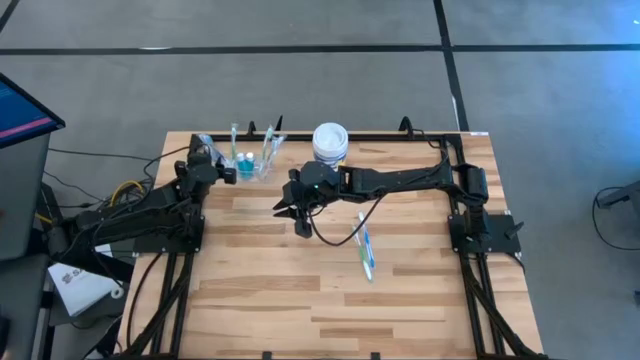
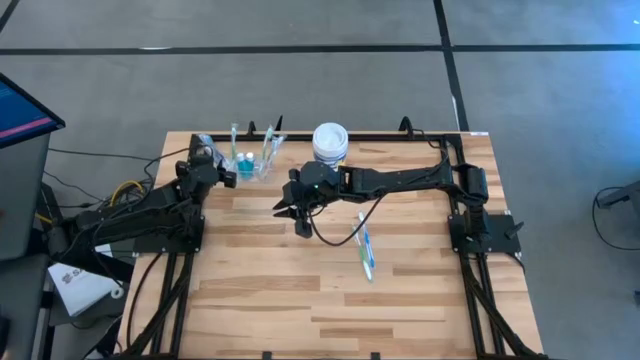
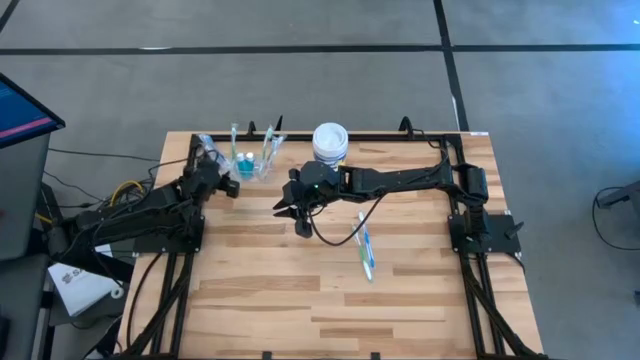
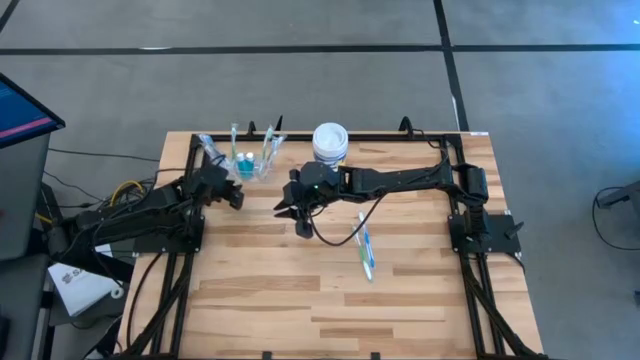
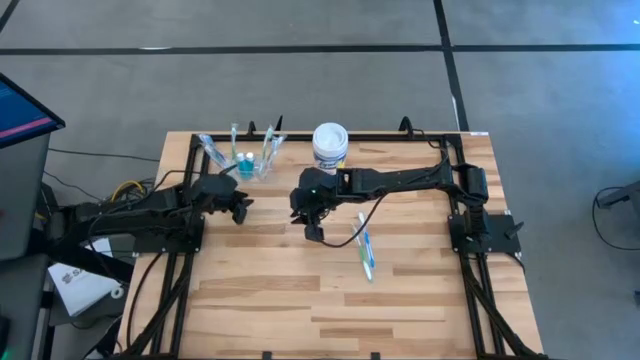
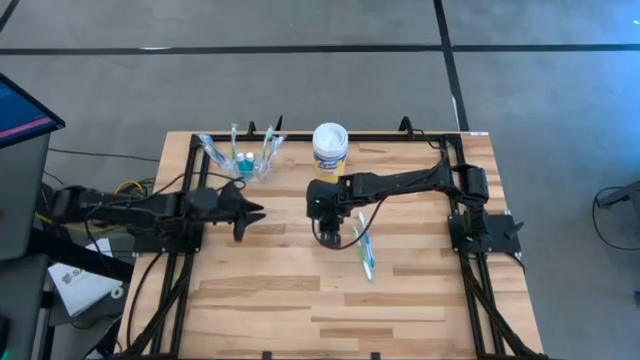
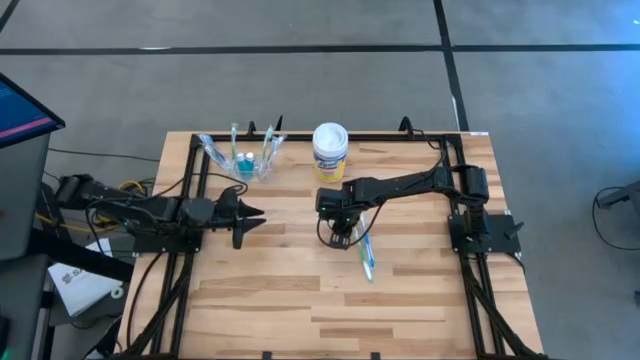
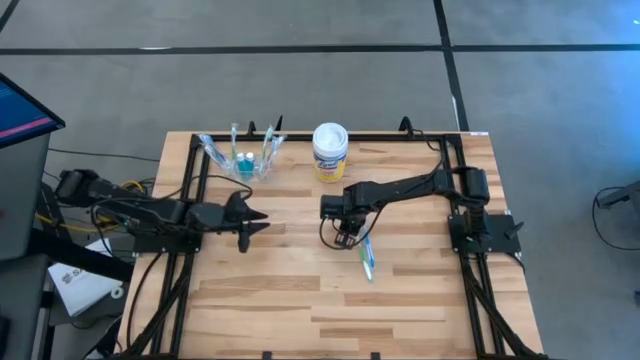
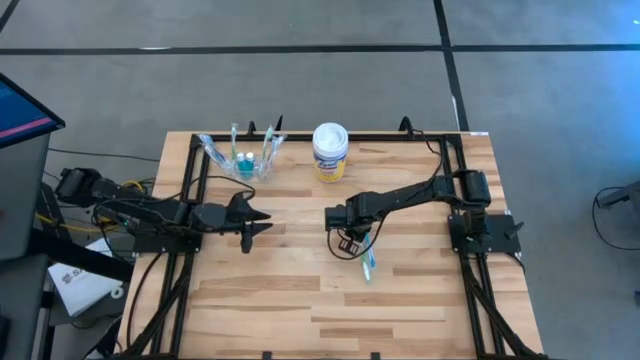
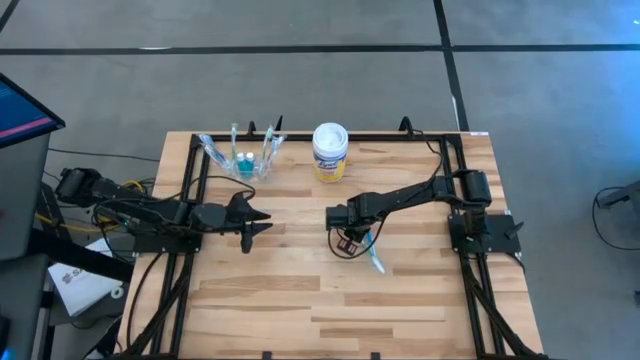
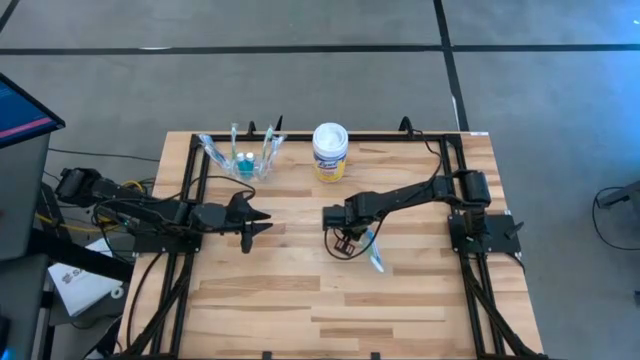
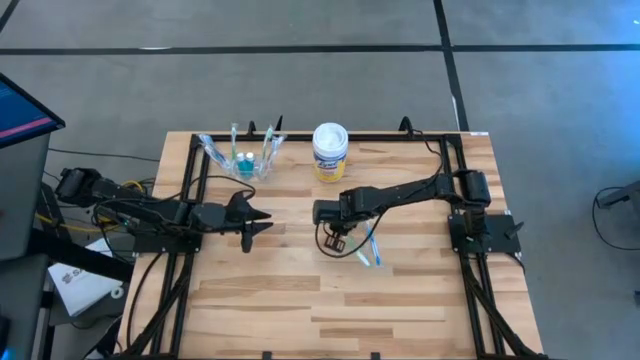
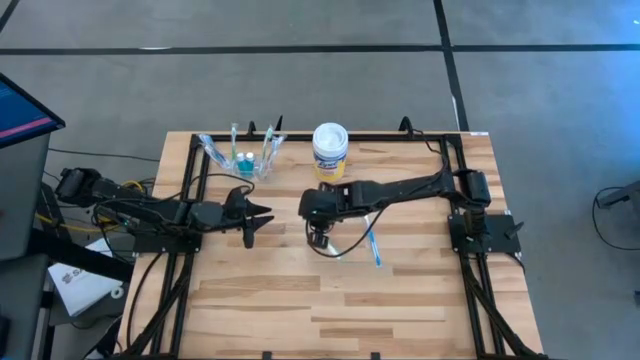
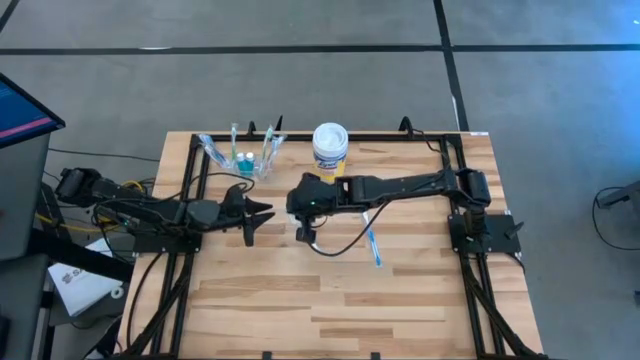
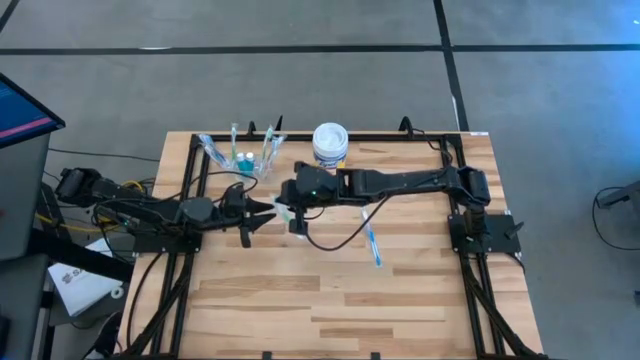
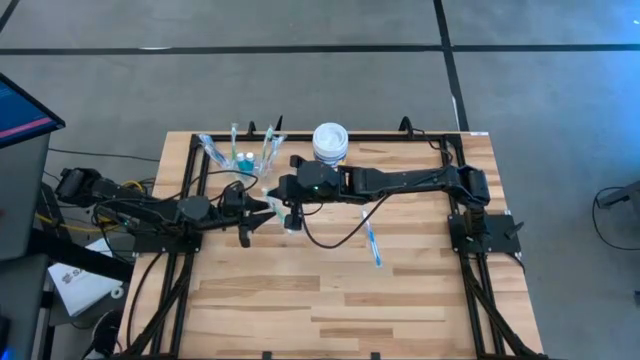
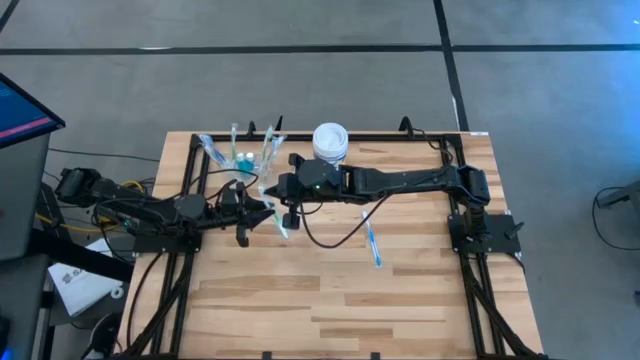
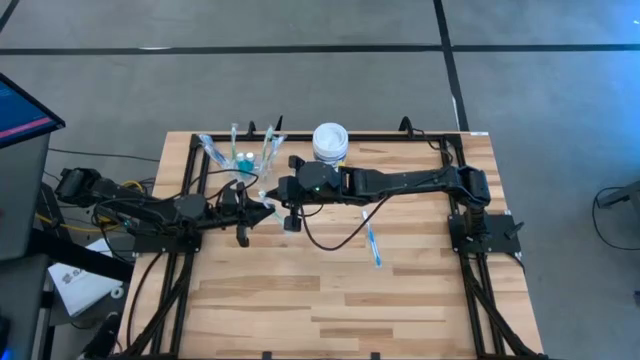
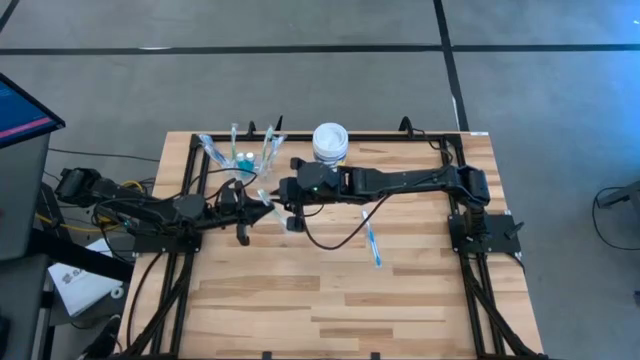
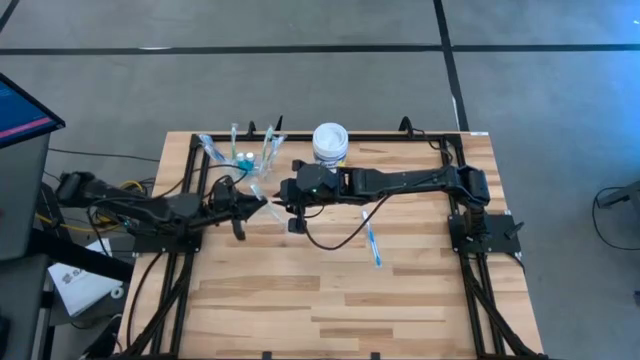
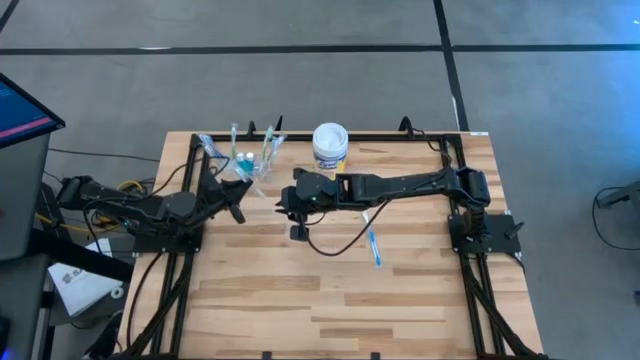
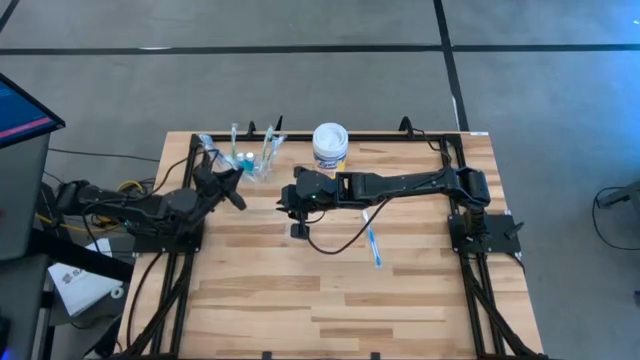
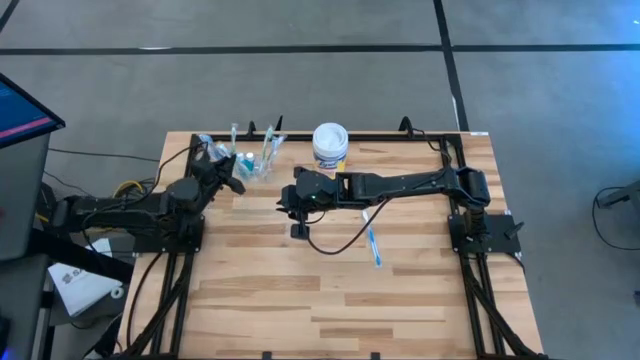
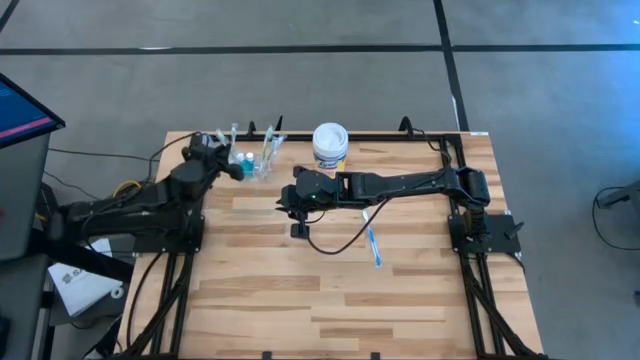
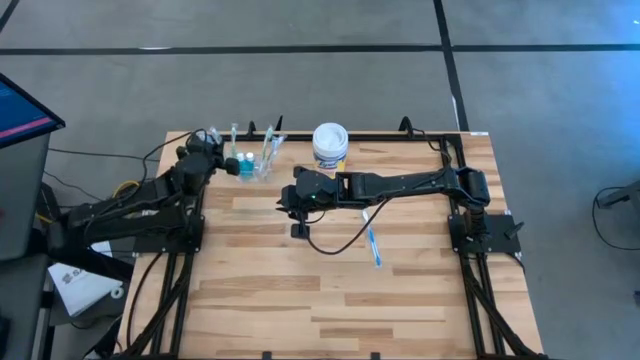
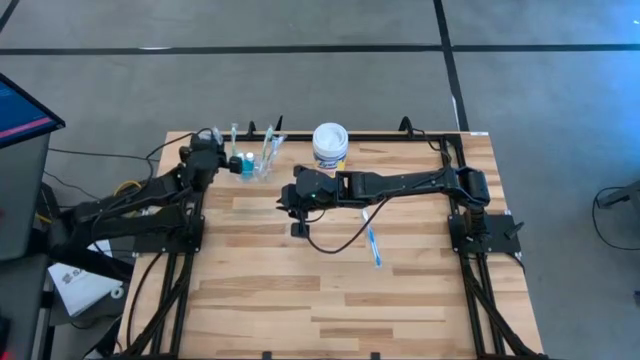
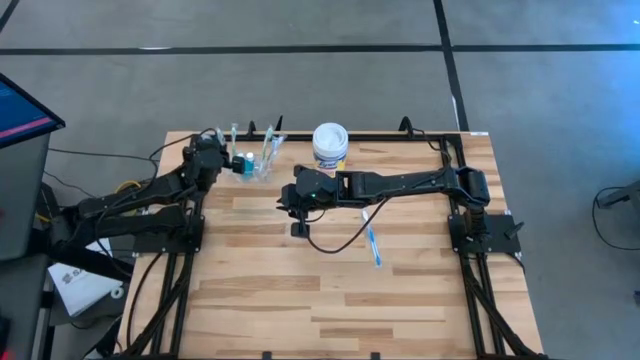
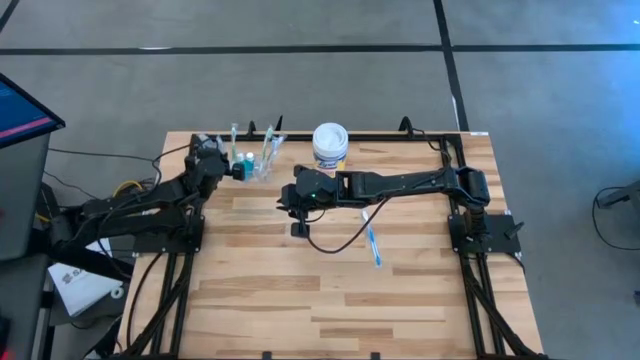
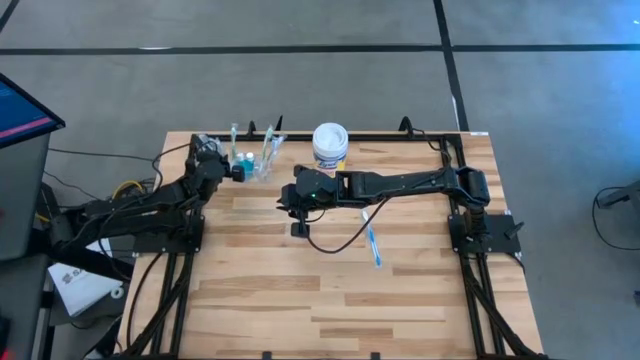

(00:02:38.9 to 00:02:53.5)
Task: Pick & Place toothbrushing station
Put the green toothbrush into the transparent organizer

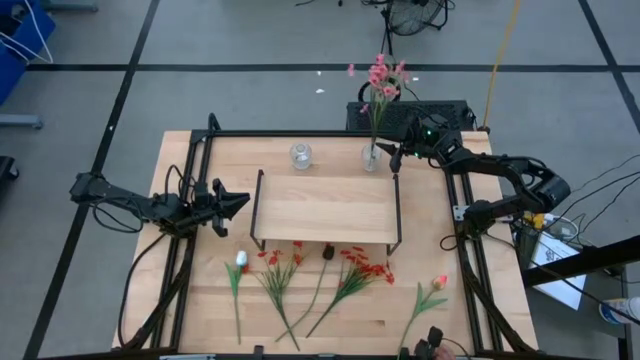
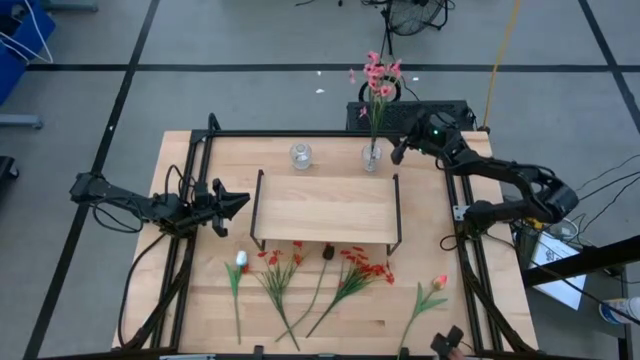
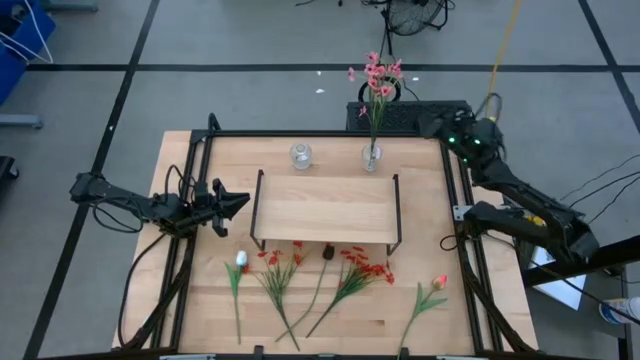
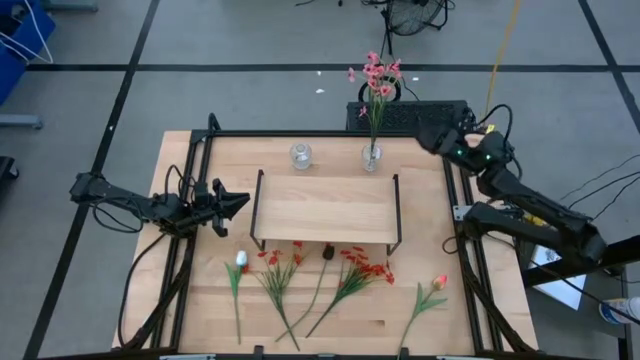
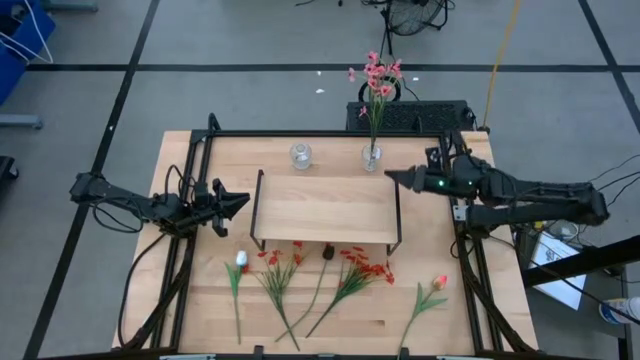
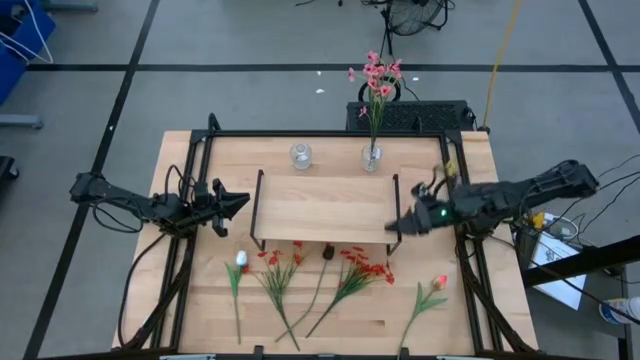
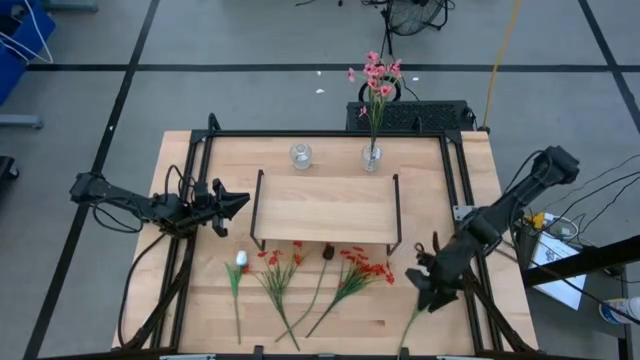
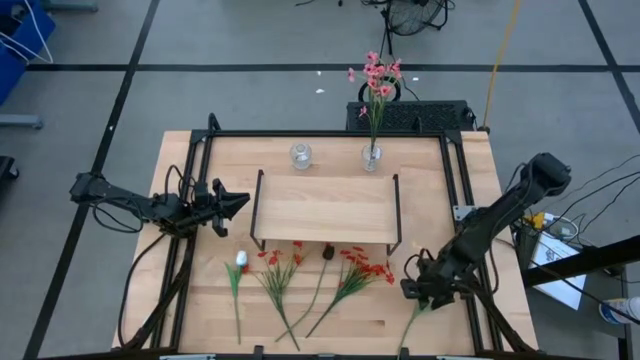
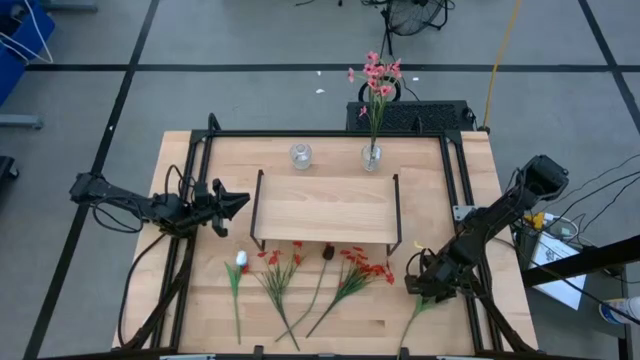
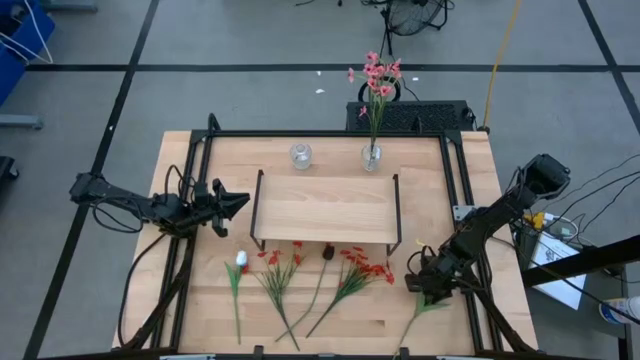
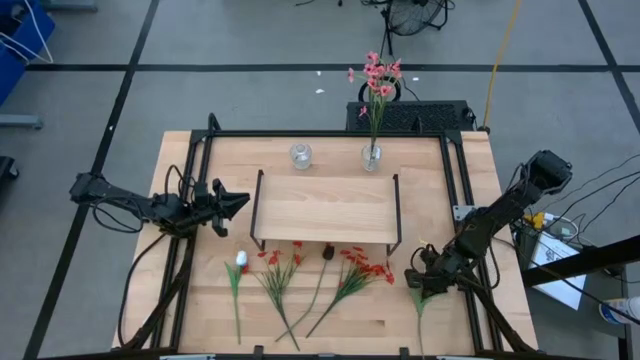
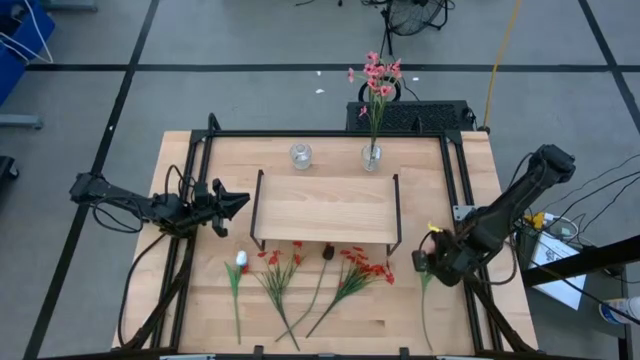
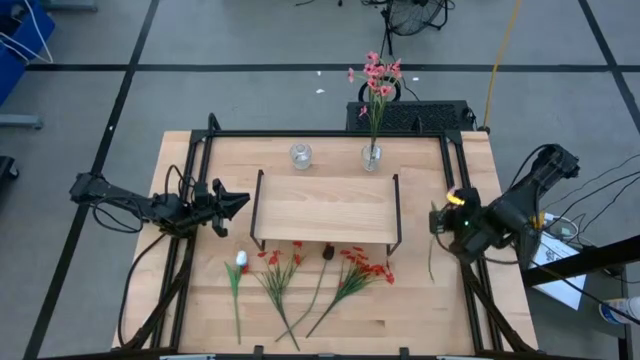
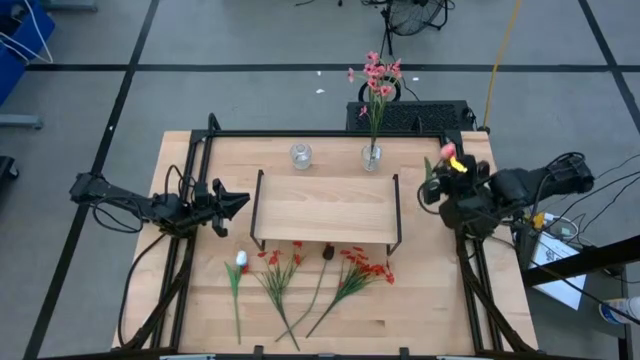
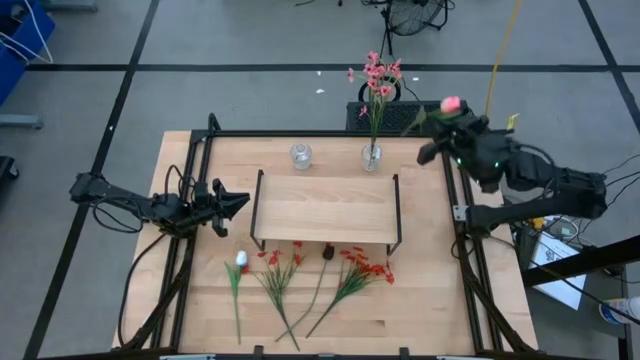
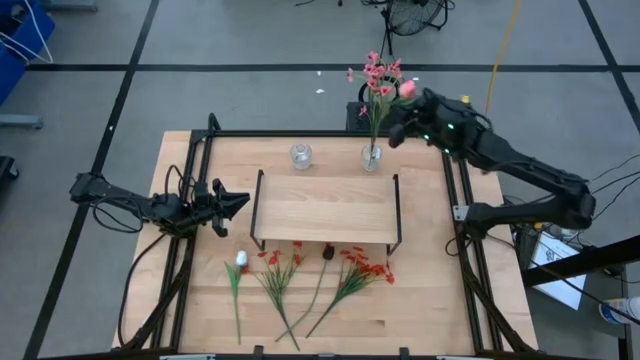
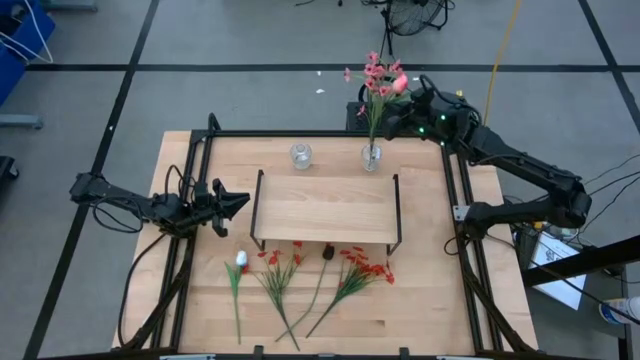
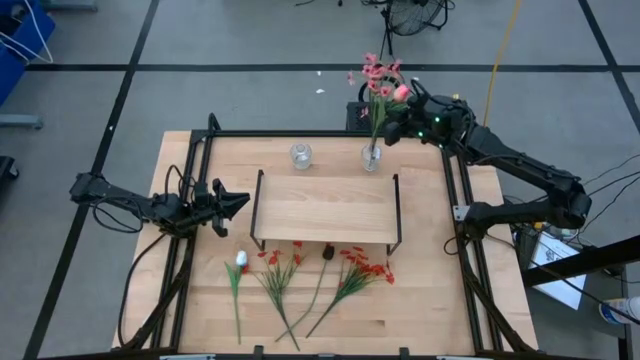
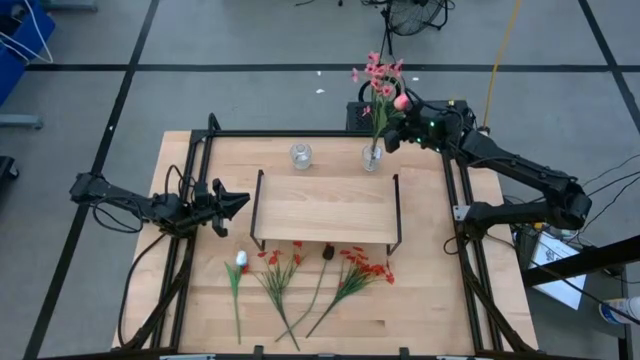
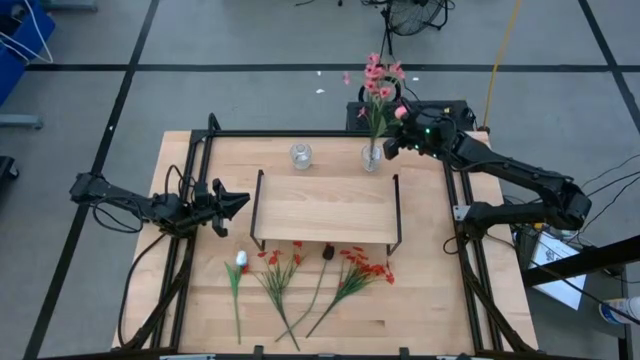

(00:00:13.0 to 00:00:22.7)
Task: Pick and place flowers into a vace then onto a shelf
Put the pink tulip into the right transparent flower vase
